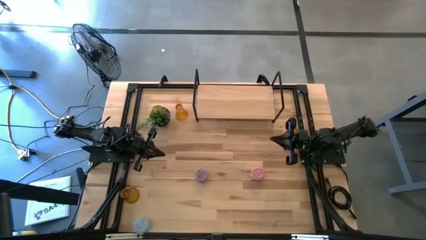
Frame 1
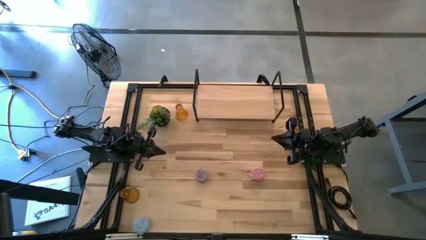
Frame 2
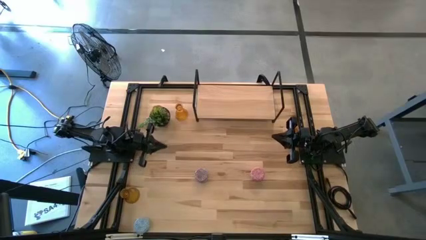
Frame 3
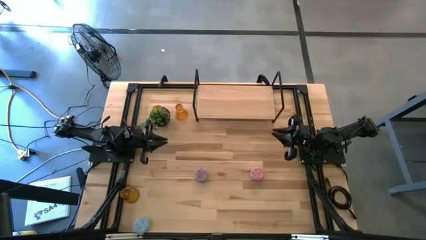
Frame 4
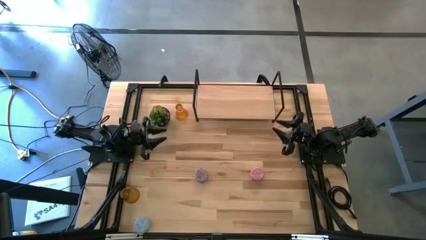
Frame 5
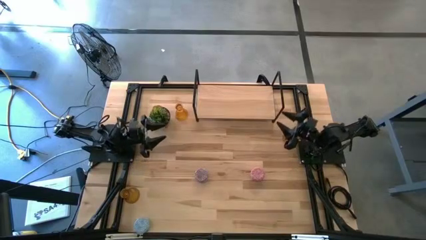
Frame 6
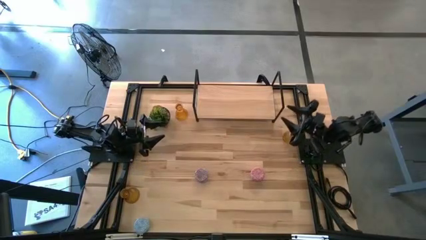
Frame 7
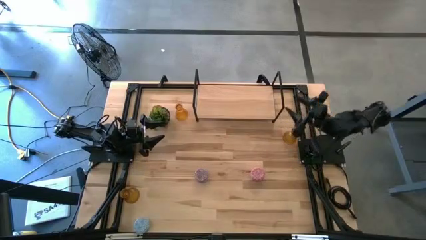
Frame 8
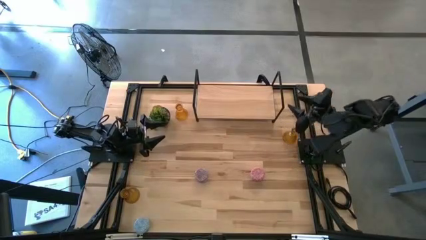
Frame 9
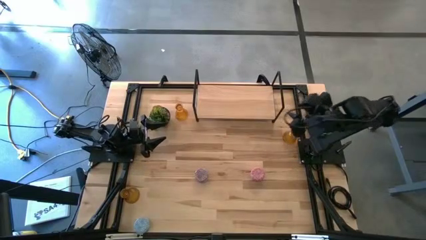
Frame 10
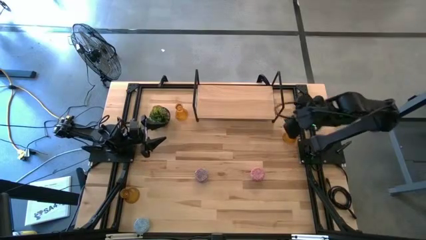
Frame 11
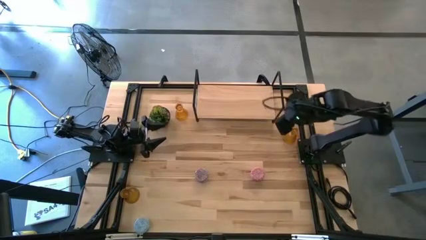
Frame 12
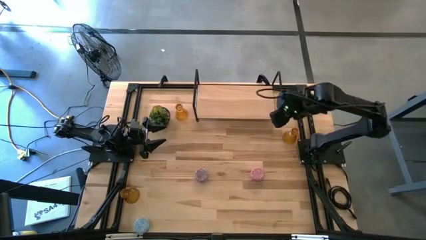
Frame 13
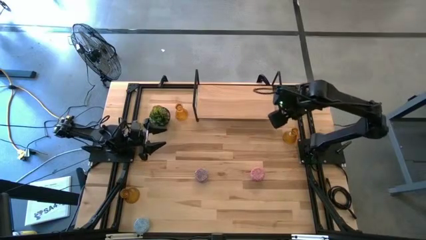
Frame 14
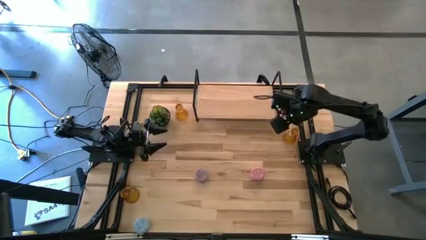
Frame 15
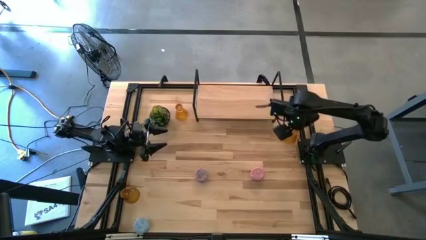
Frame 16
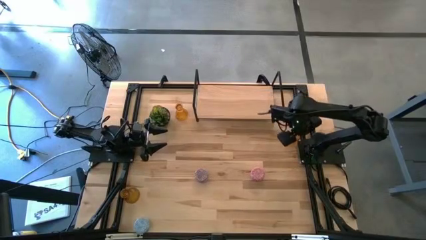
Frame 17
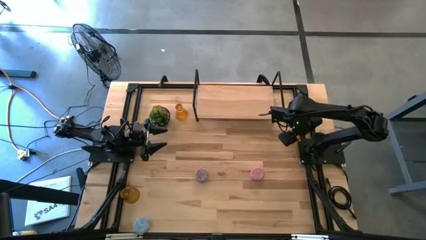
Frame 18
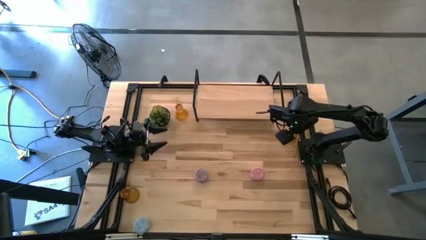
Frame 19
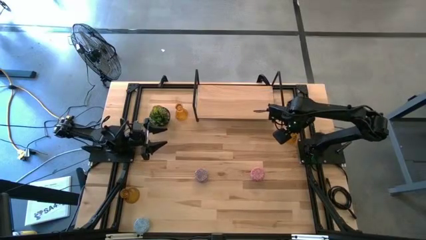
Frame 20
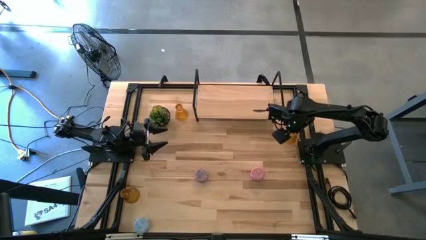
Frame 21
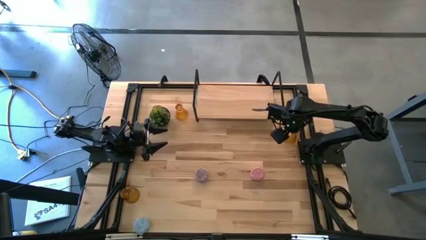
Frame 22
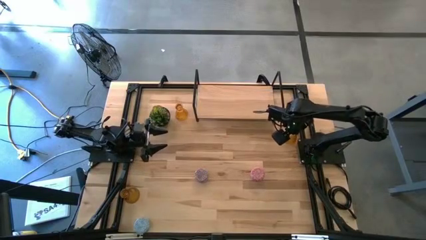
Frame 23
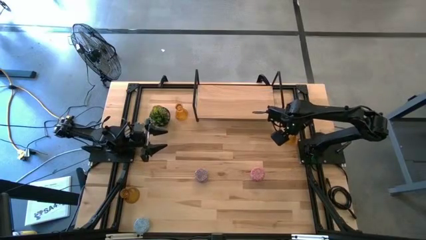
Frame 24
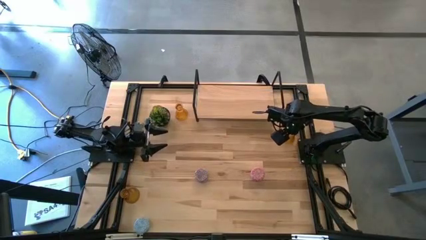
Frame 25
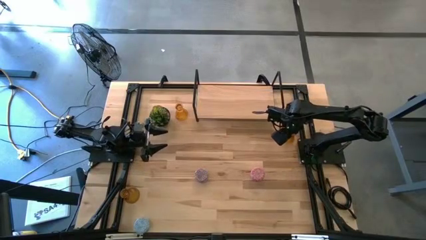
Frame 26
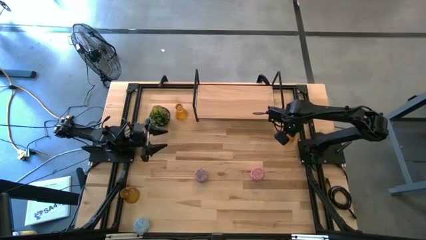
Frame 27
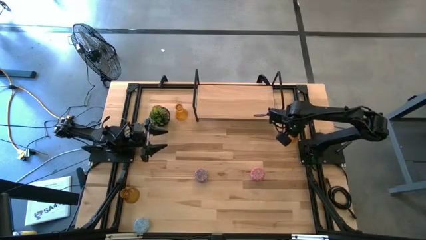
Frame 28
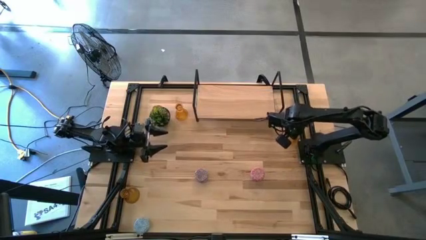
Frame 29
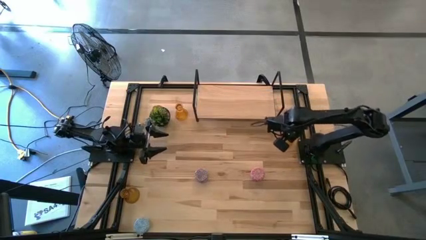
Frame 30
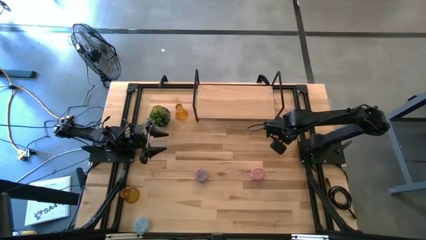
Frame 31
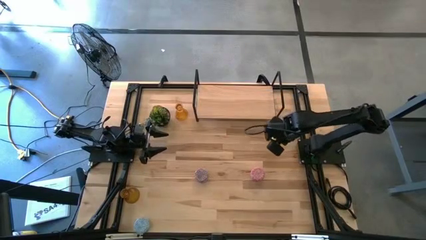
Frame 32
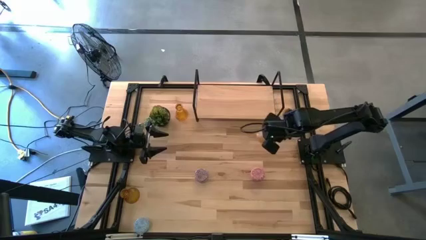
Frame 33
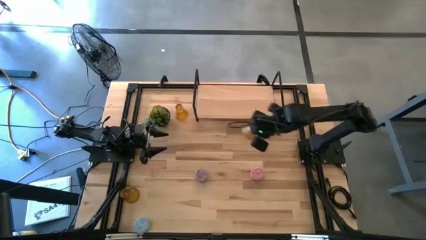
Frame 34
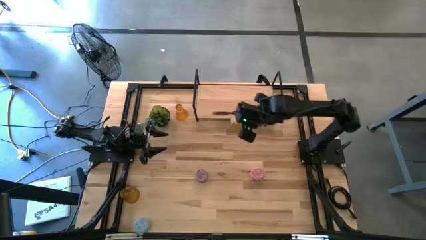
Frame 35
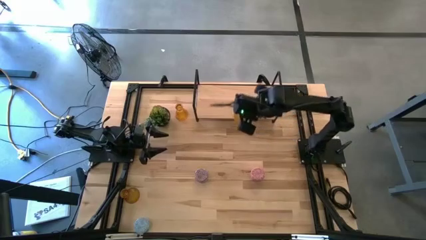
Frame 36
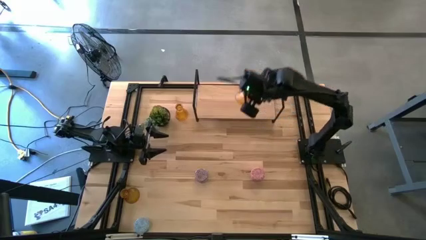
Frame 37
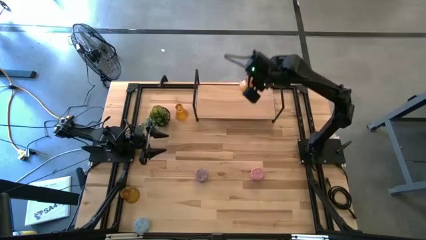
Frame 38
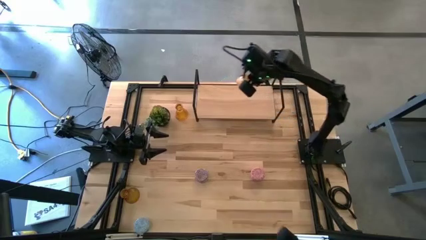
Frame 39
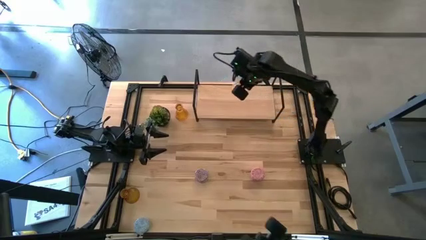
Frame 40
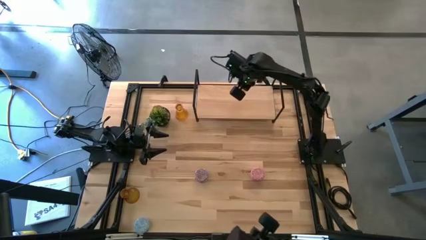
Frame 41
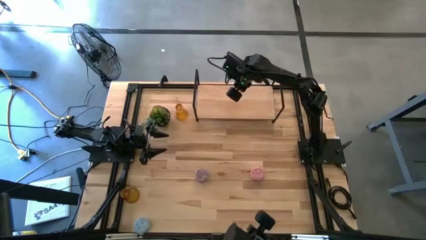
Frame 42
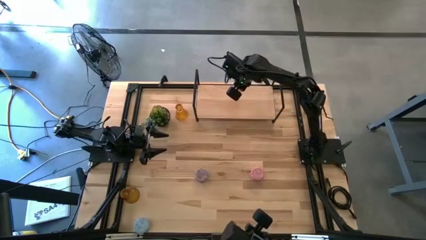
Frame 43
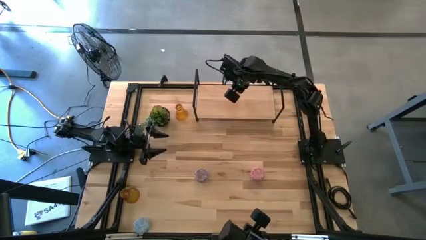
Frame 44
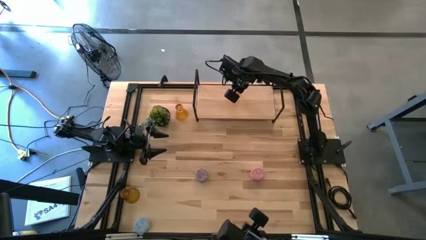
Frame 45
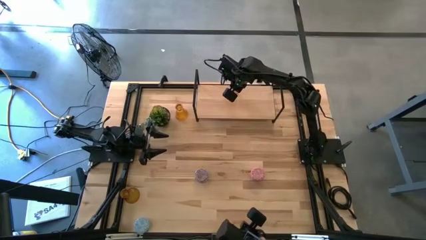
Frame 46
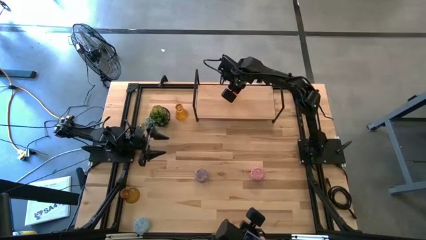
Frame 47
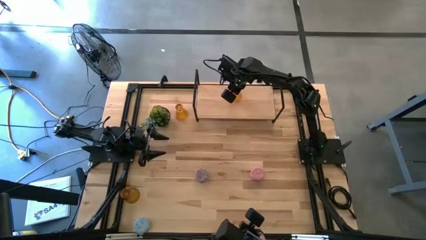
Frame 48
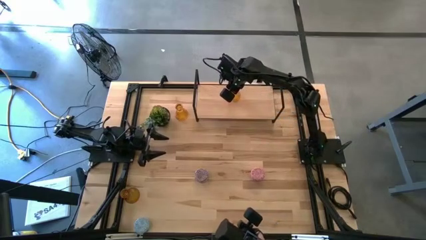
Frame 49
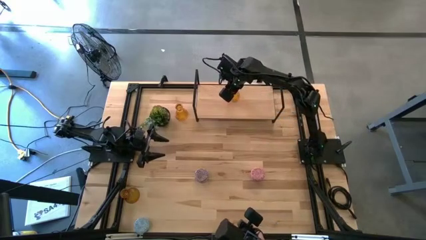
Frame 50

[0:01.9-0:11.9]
Task: Pick & Place candle stick holders
Put the top right yellow candle holder on the shelf

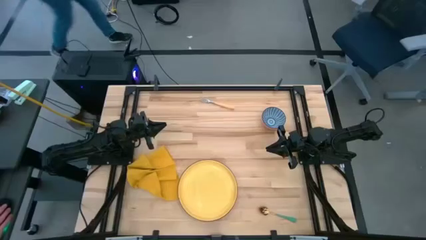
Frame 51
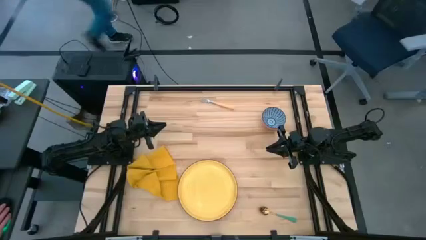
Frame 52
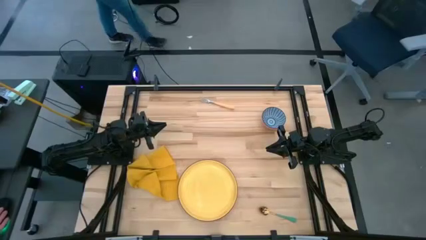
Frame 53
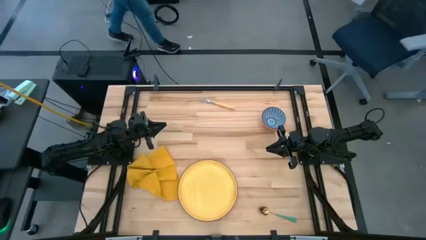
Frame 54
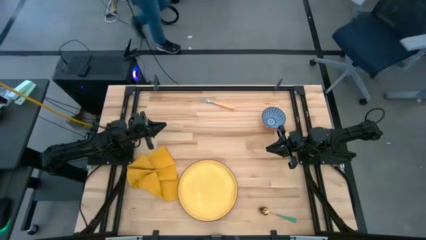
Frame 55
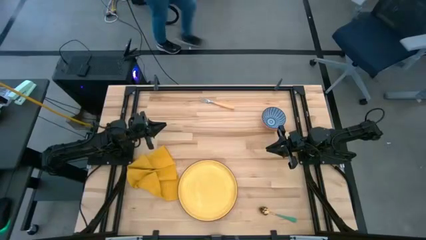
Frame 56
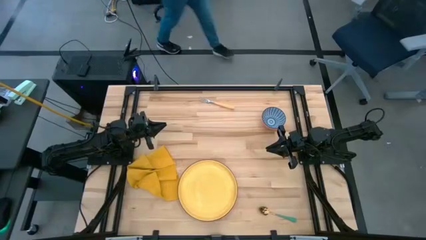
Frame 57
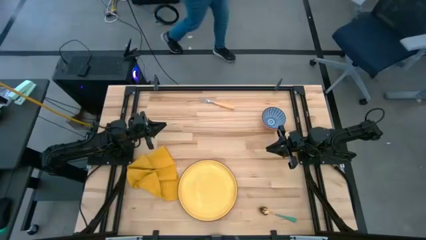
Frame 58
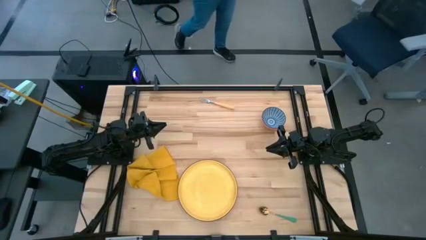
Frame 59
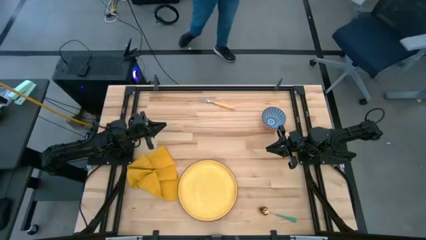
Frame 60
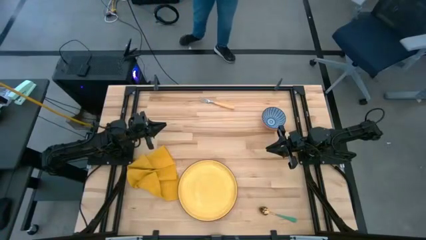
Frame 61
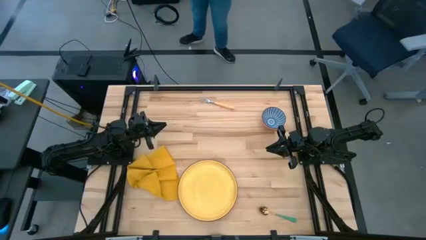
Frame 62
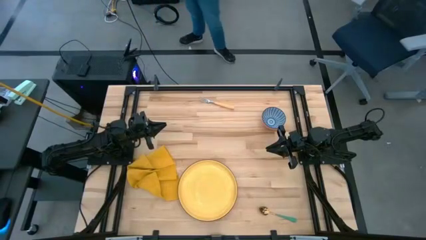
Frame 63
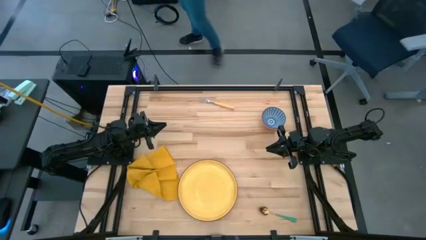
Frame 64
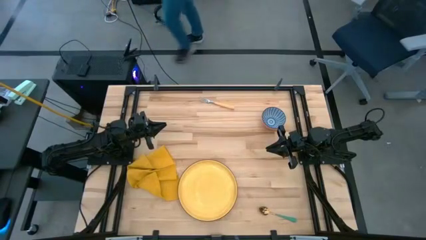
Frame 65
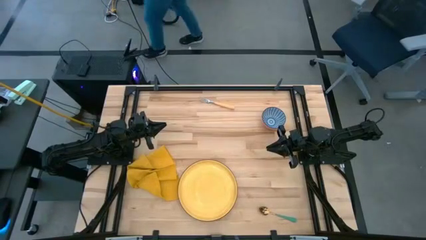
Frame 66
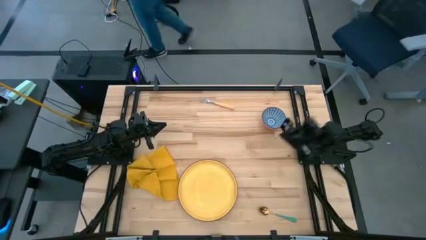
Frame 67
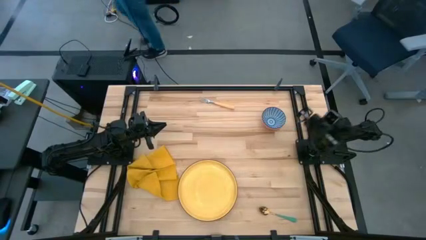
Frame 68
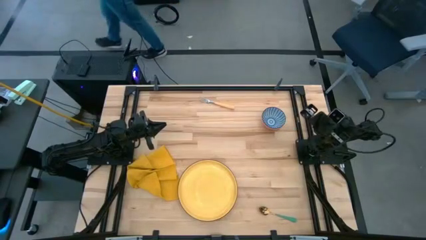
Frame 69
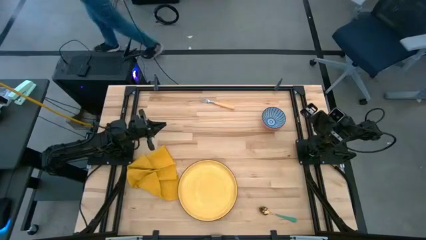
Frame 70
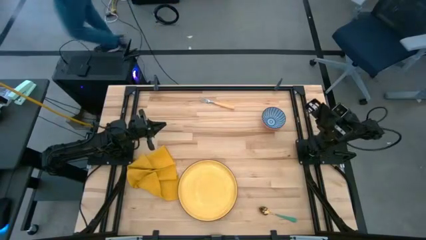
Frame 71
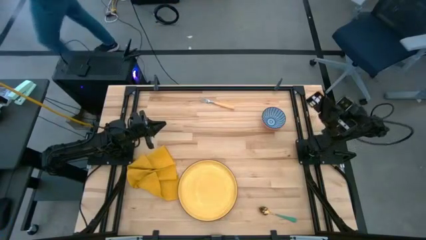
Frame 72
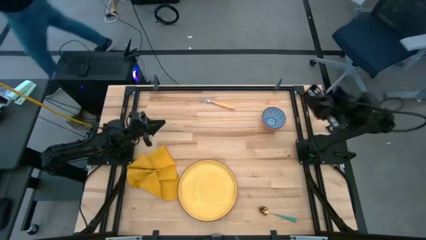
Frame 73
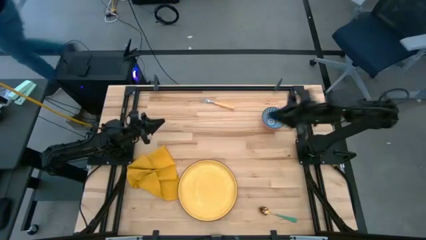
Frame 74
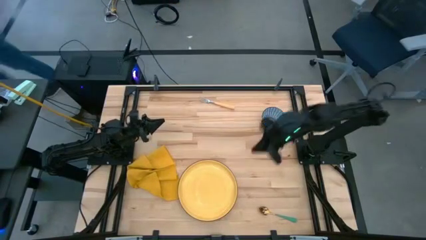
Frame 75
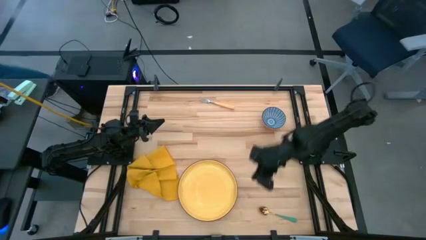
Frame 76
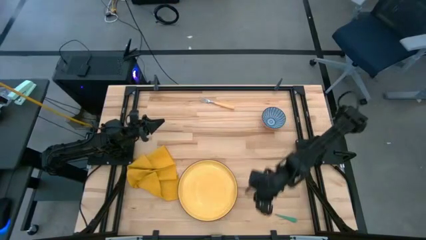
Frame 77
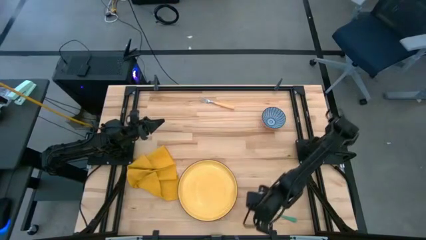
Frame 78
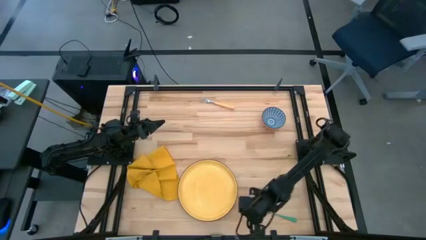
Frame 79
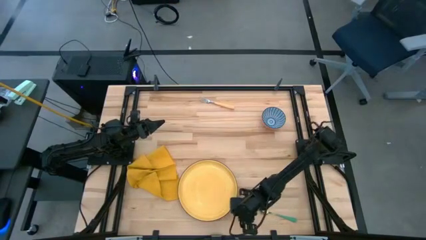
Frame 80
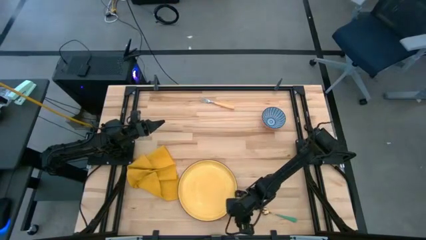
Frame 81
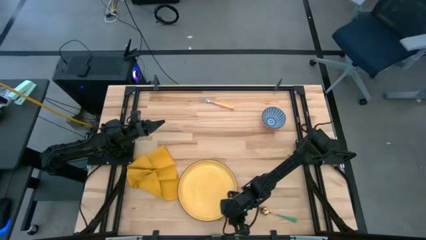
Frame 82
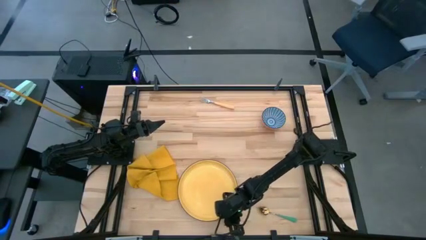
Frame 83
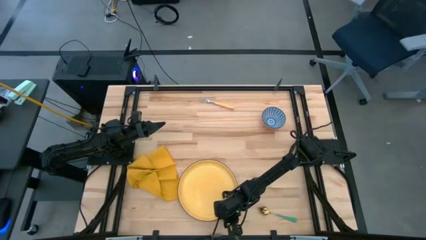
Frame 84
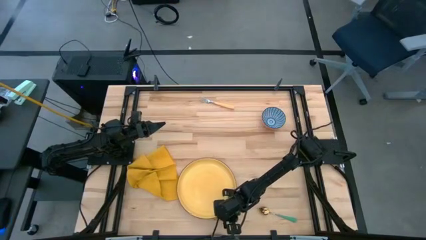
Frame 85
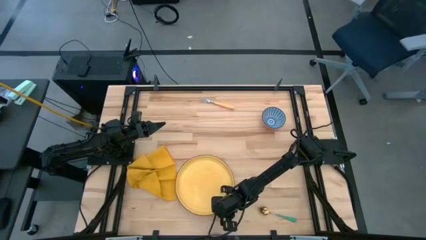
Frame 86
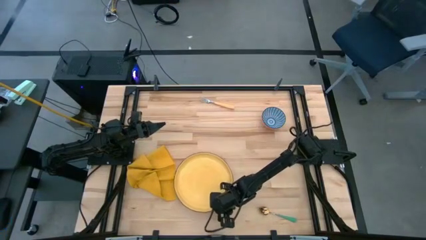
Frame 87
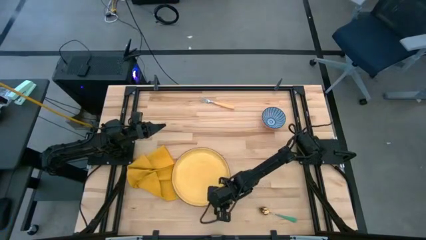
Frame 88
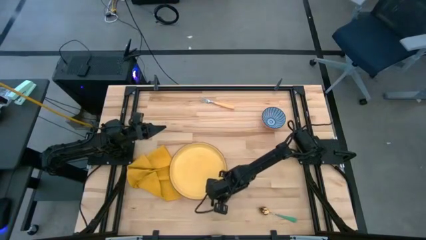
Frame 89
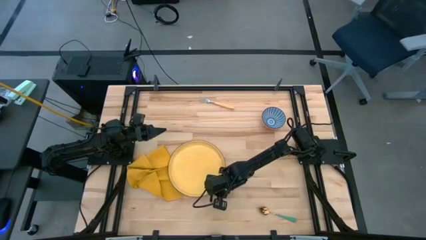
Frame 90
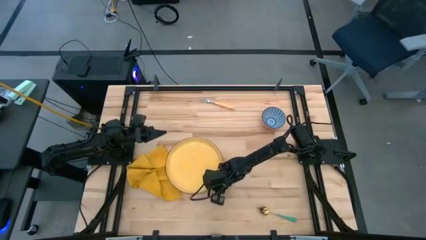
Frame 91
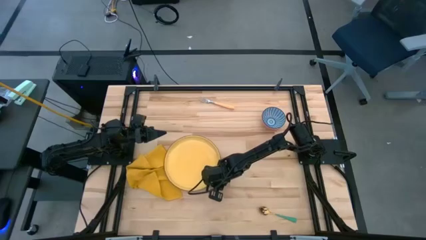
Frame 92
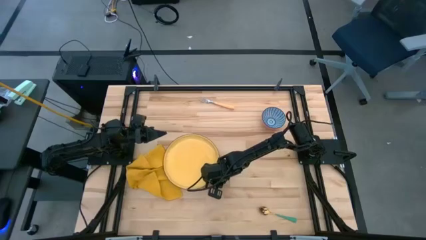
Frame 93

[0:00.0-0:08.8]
Task: Set table place
Move the yellow plate to the middle of the table
